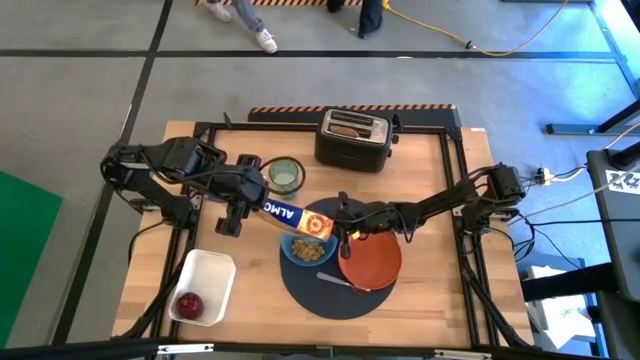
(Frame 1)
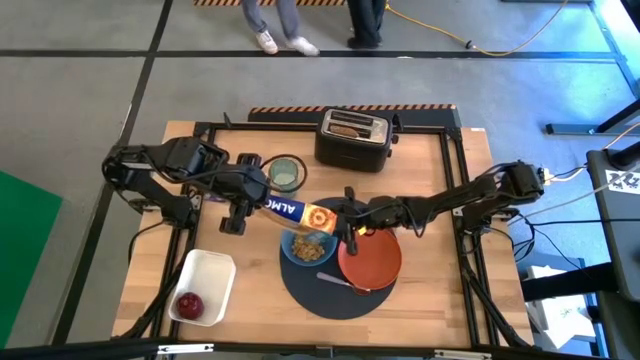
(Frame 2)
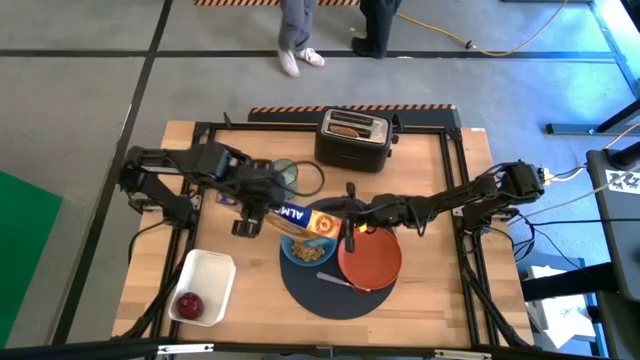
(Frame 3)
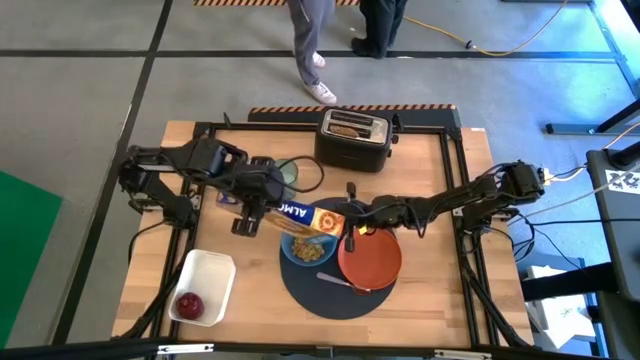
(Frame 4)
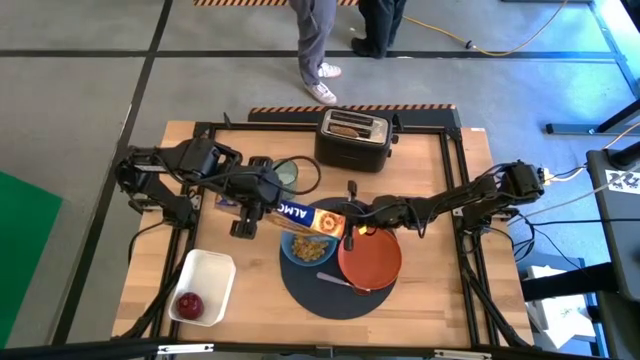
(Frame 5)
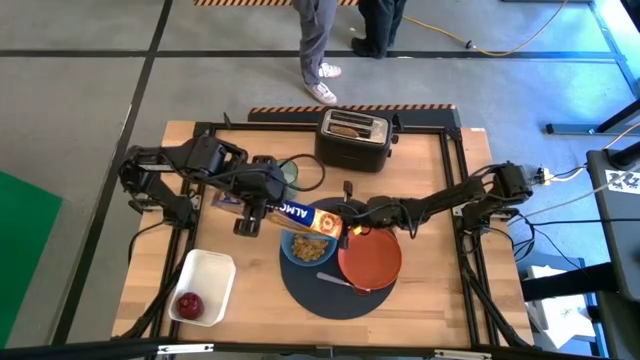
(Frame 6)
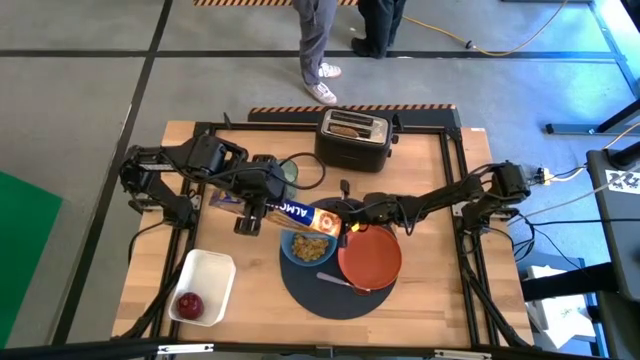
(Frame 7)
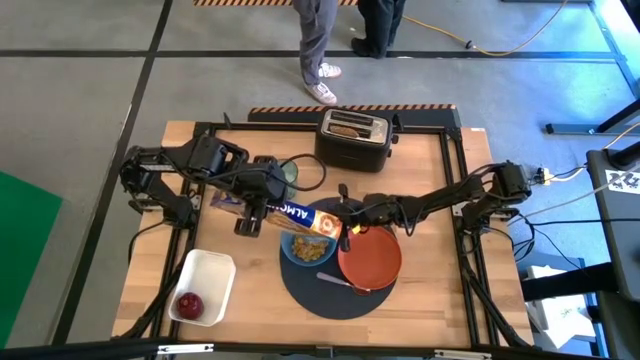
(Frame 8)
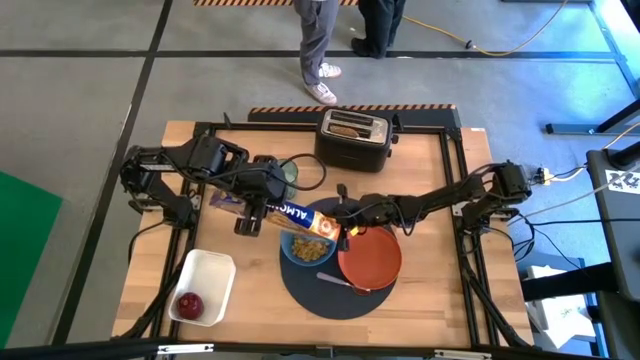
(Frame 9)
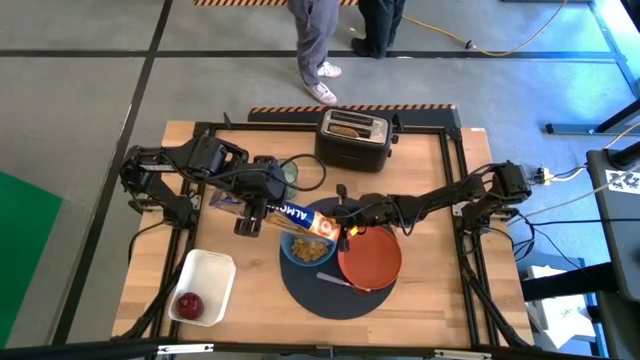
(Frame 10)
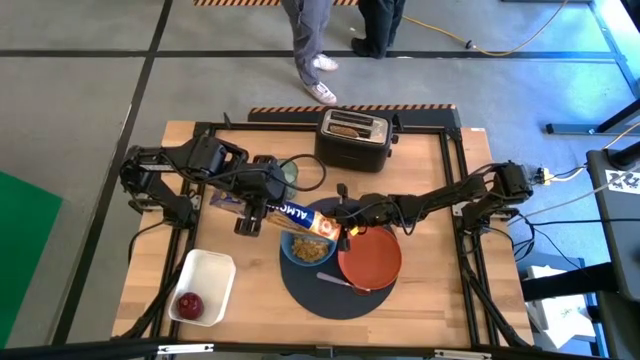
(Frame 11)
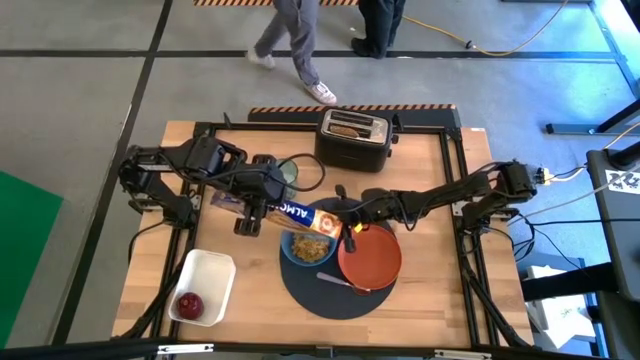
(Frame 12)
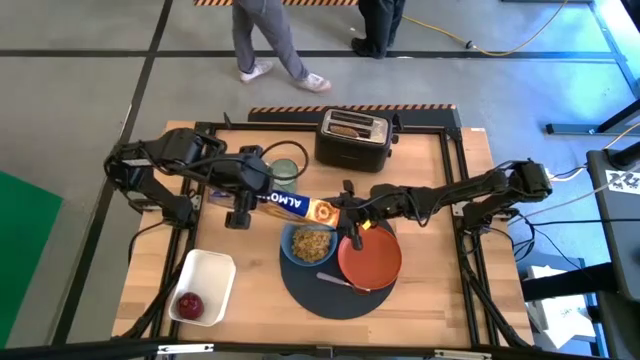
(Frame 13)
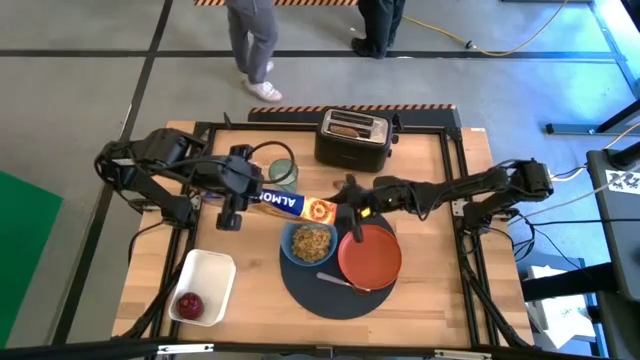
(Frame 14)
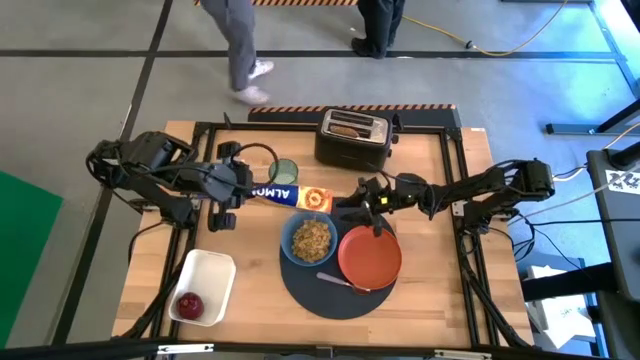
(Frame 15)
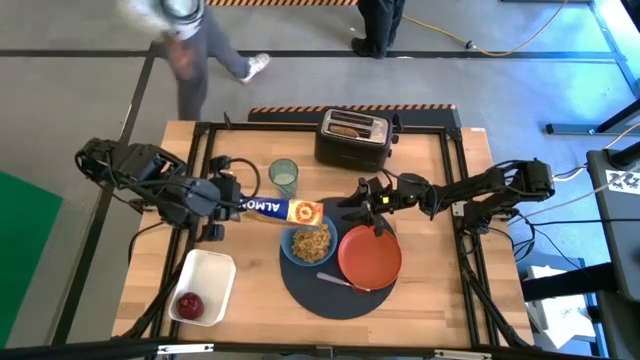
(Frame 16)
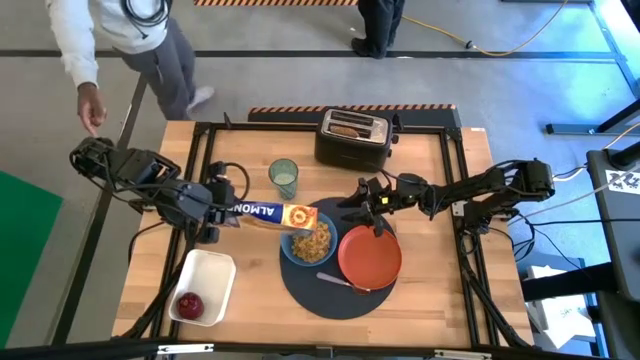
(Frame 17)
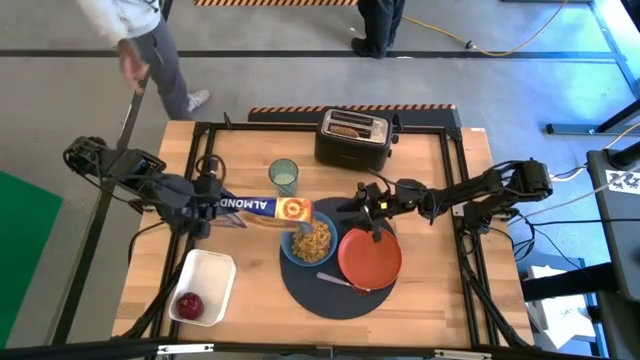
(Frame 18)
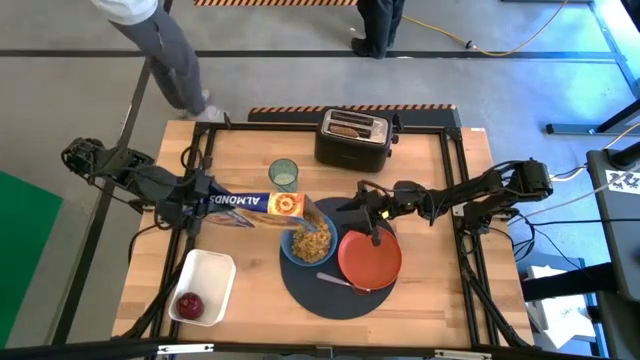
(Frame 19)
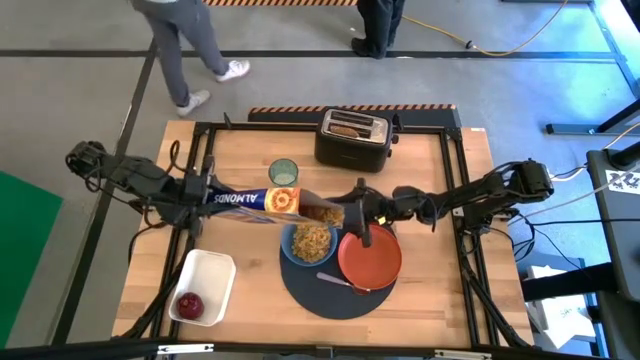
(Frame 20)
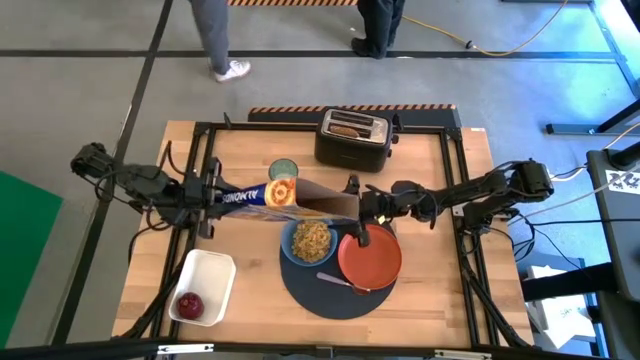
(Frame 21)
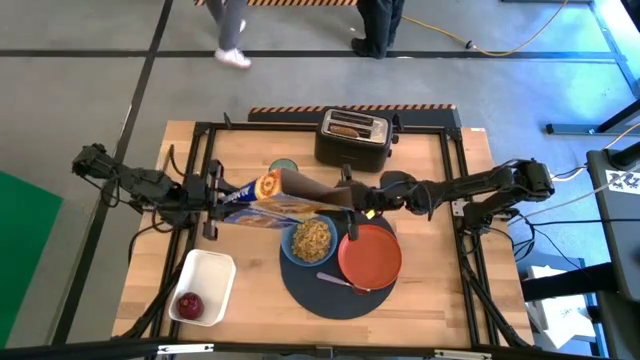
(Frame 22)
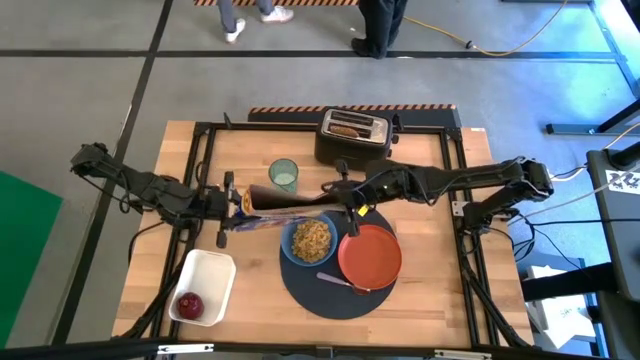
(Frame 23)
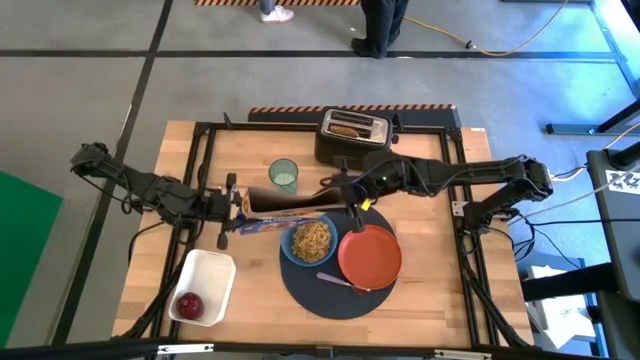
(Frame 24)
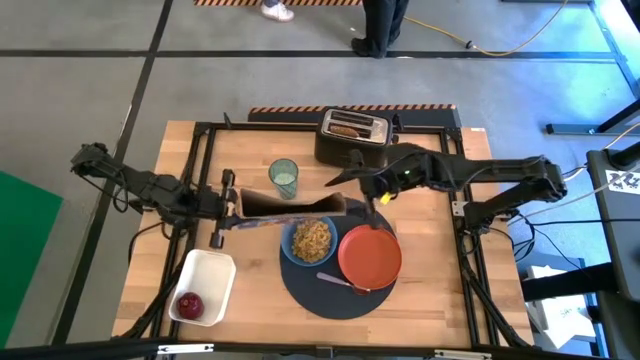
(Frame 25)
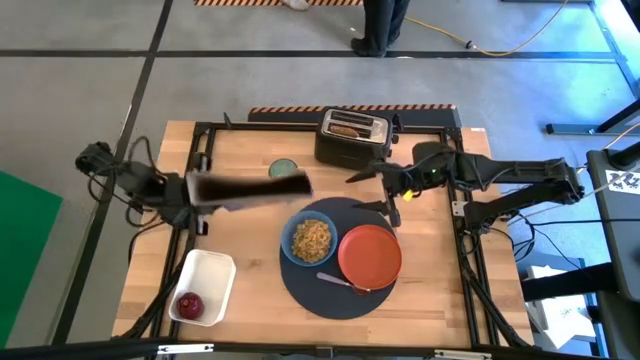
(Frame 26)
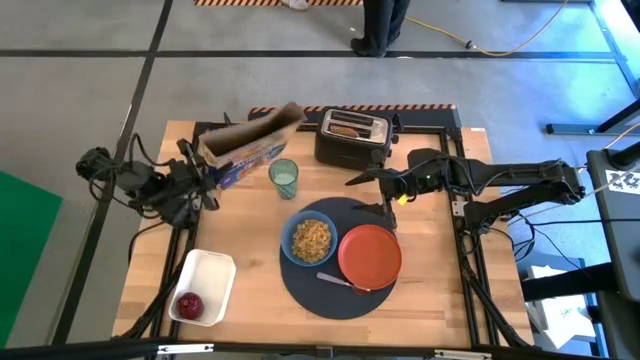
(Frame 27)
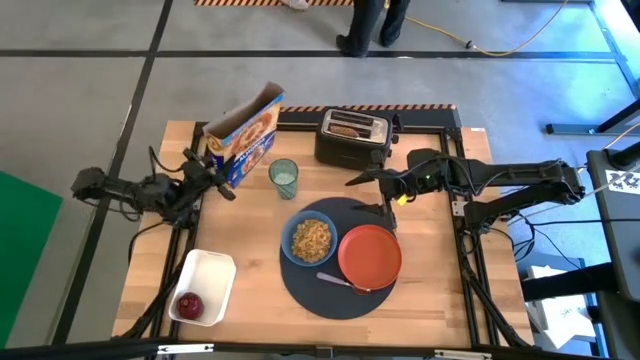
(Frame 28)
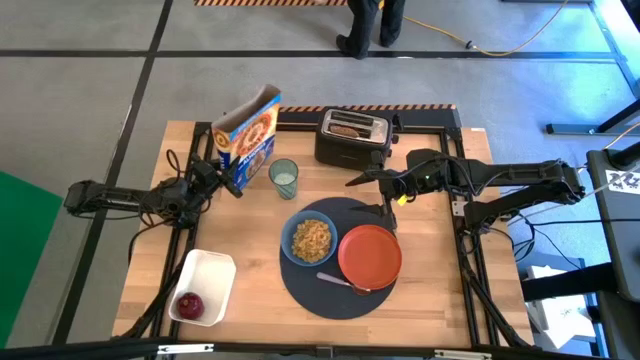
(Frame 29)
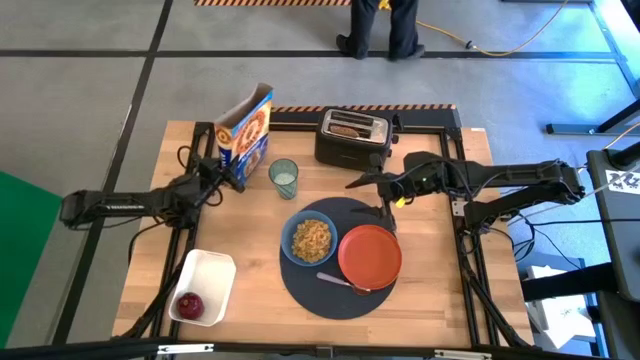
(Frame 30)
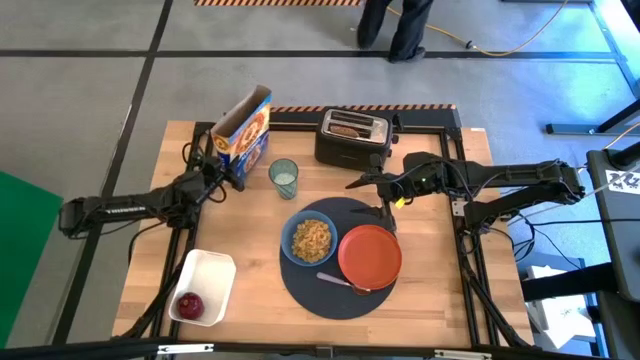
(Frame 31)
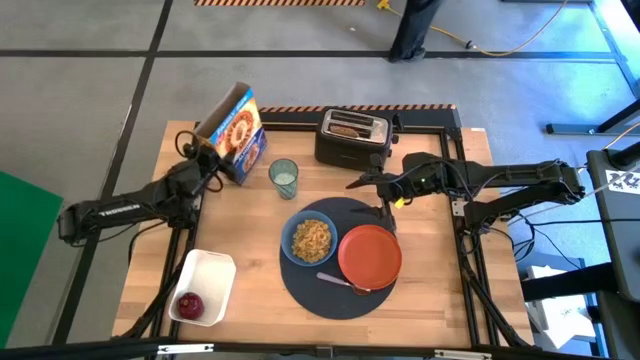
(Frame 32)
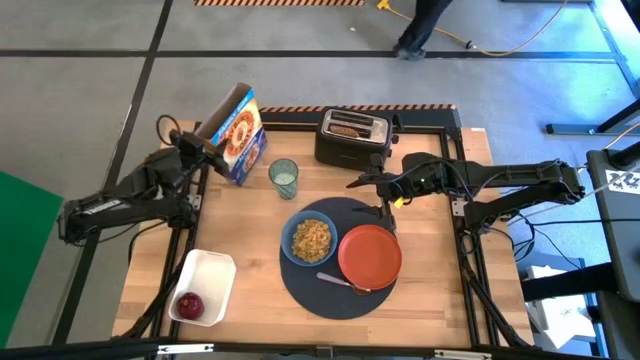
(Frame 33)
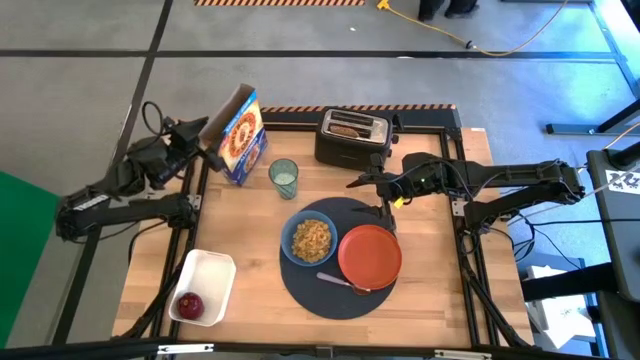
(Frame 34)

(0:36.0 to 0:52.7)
Task: Arrange a breakfast setting
Pour the cereal from the cereal box into the blue bowl

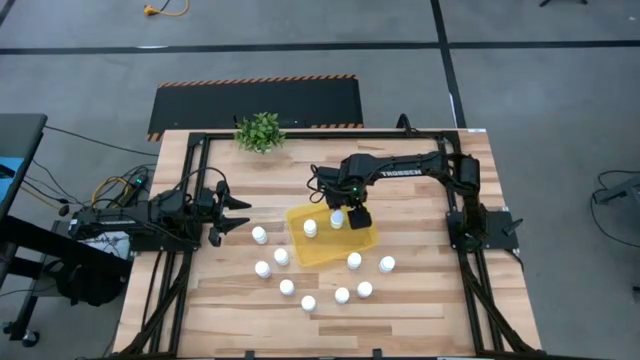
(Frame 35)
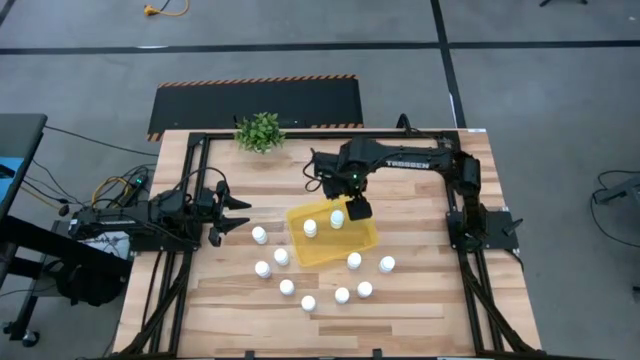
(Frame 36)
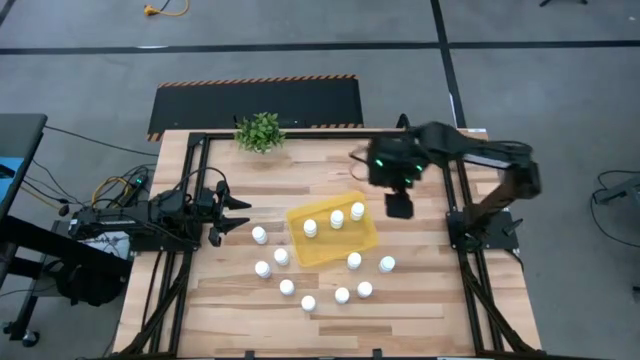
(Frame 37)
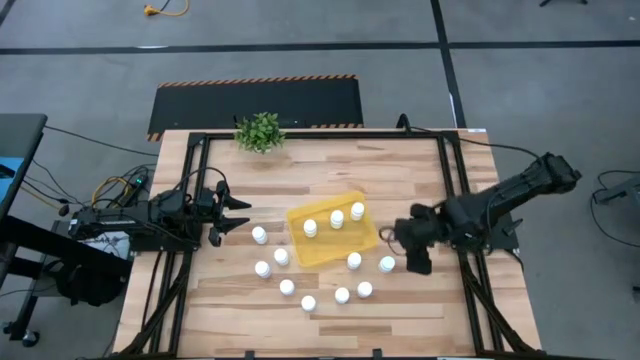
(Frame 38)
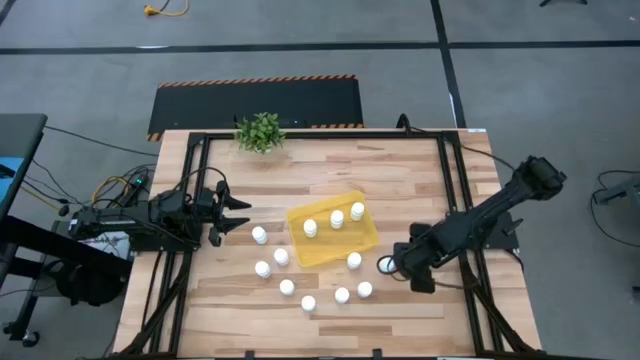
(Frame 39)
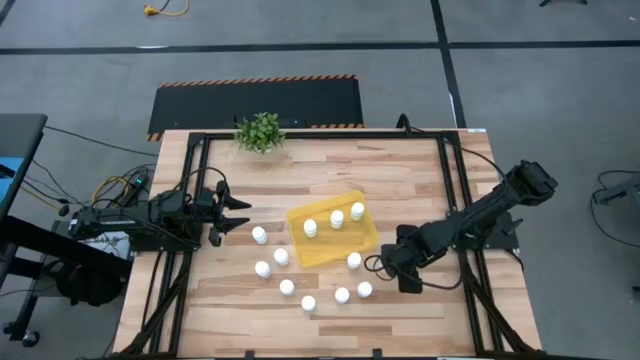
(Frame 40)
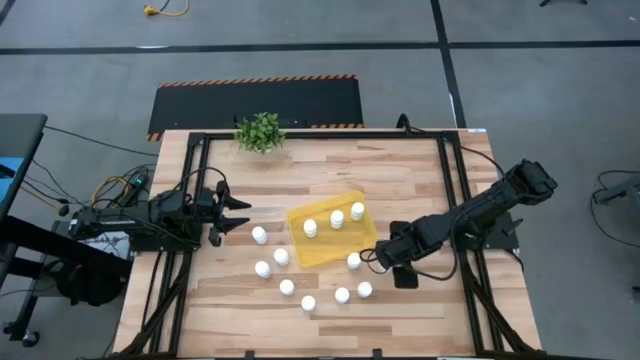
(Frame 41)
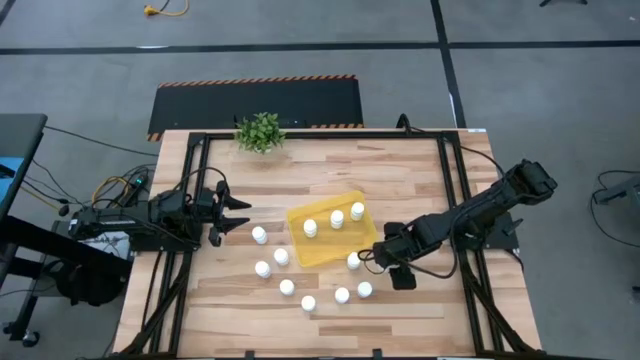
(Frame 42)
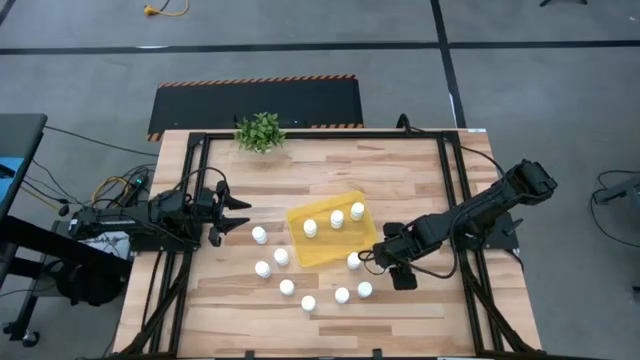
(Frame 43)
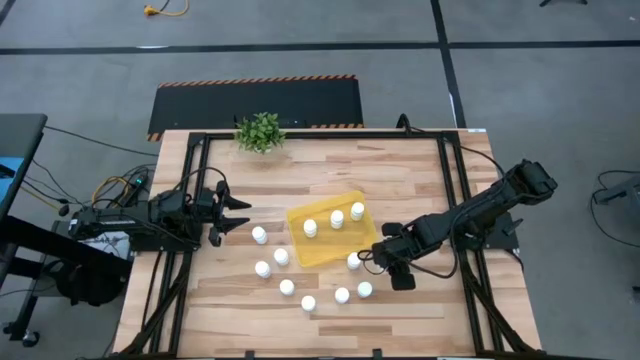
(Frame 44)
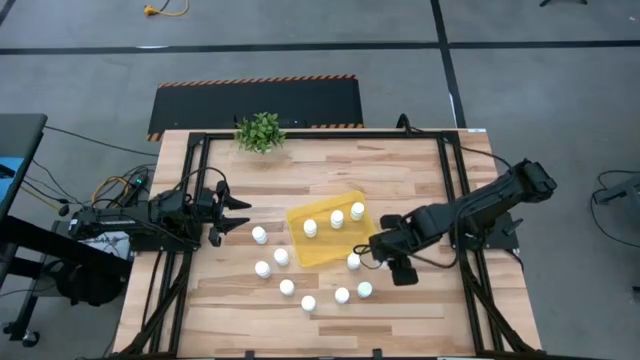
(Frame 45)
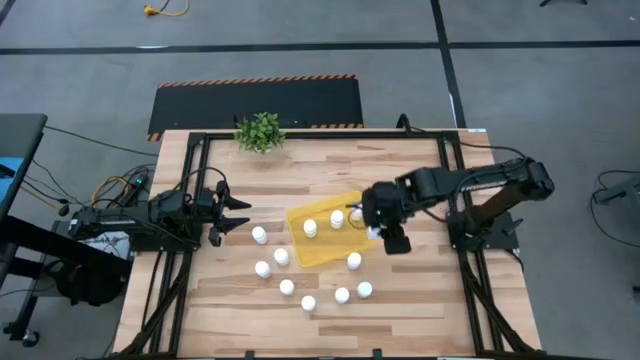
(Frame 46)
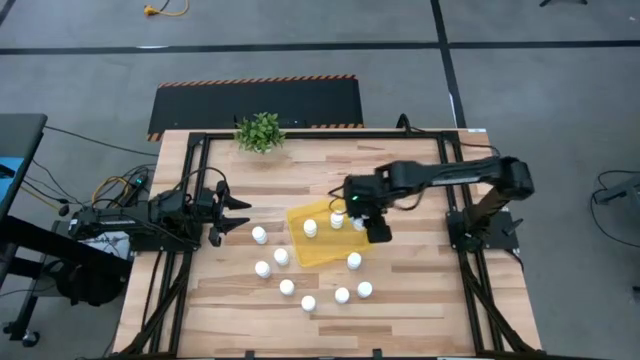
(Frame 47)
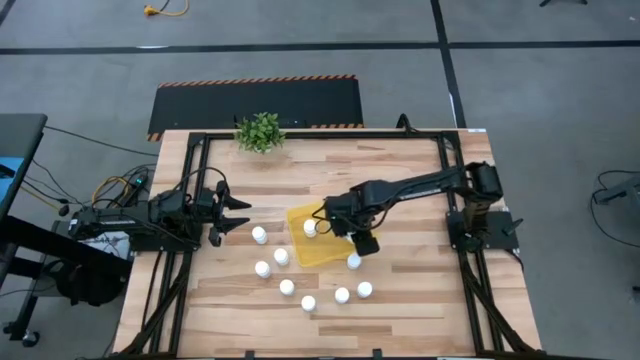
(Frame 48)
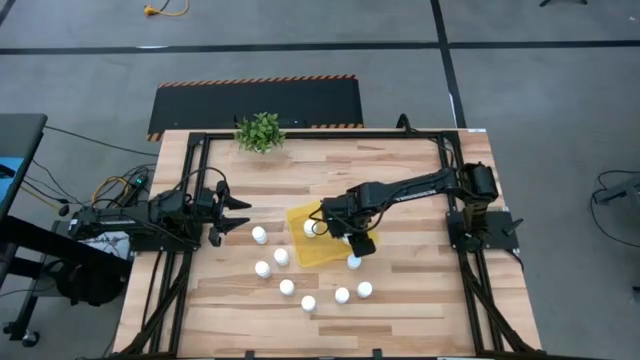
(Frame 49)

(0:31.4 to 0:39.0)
Task: Pick and place pill bottles into a basket
Put the white pill bottle into the yellow bin
